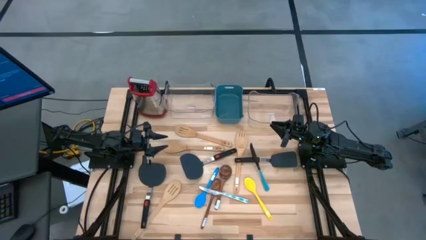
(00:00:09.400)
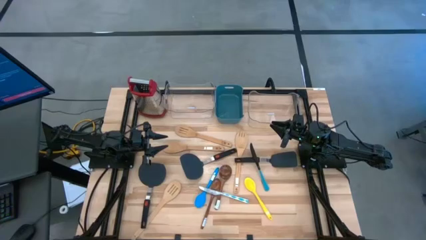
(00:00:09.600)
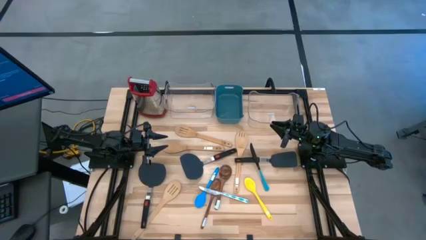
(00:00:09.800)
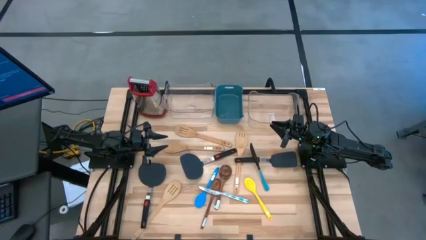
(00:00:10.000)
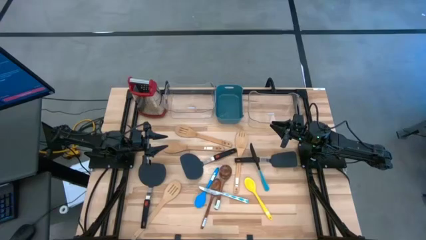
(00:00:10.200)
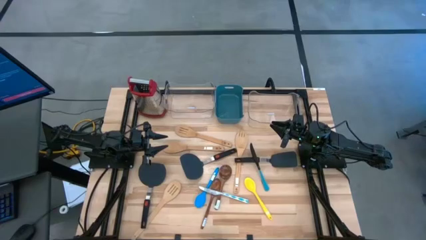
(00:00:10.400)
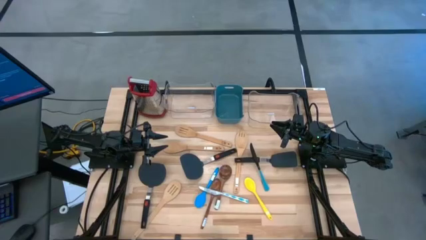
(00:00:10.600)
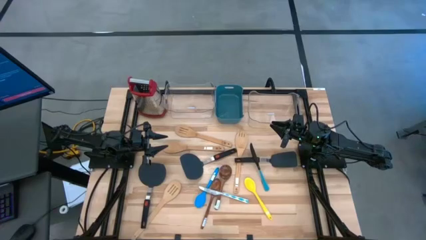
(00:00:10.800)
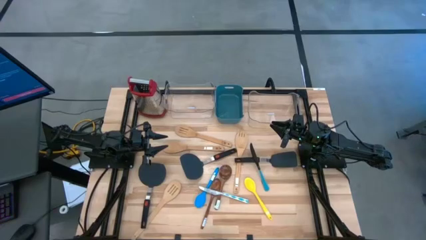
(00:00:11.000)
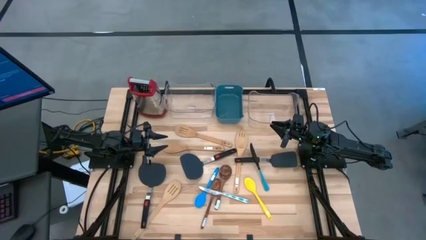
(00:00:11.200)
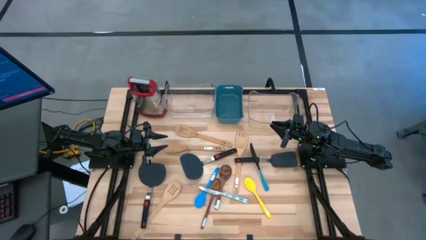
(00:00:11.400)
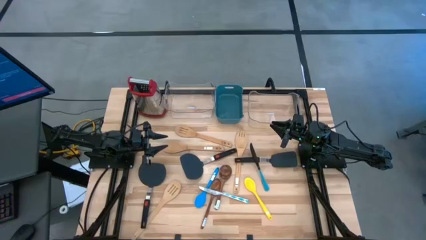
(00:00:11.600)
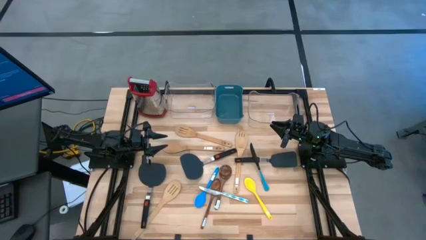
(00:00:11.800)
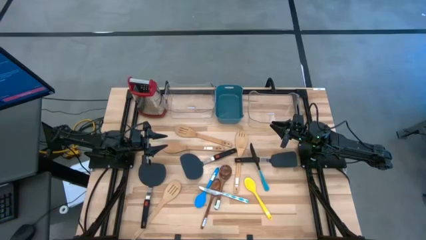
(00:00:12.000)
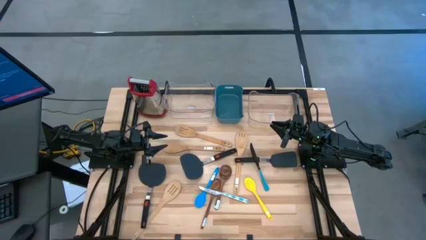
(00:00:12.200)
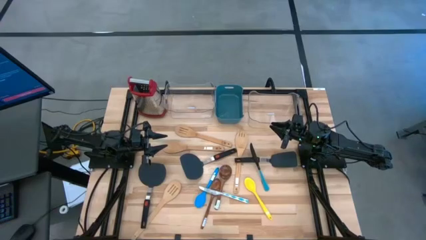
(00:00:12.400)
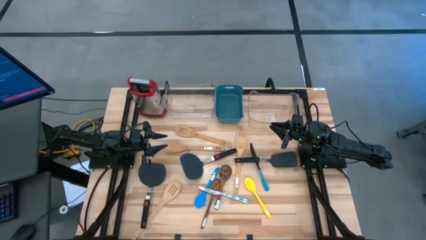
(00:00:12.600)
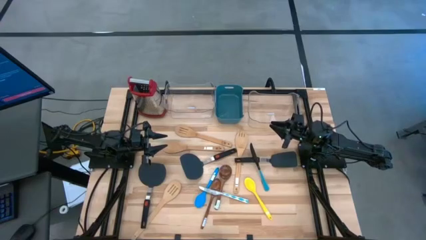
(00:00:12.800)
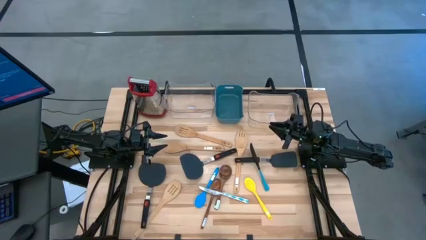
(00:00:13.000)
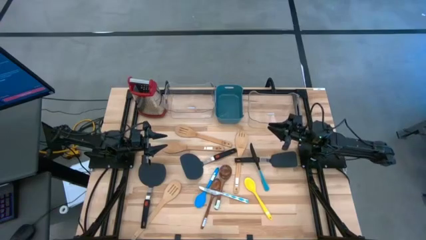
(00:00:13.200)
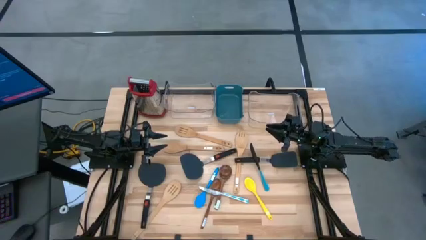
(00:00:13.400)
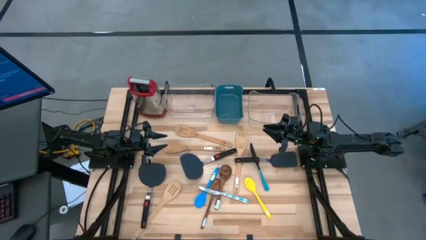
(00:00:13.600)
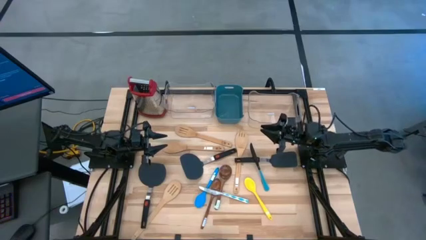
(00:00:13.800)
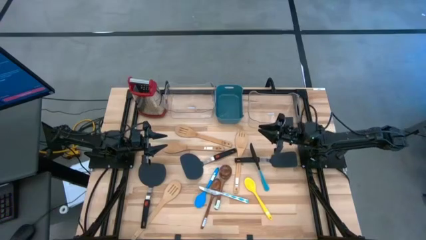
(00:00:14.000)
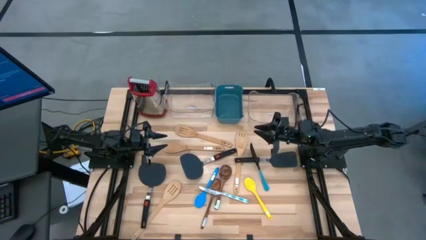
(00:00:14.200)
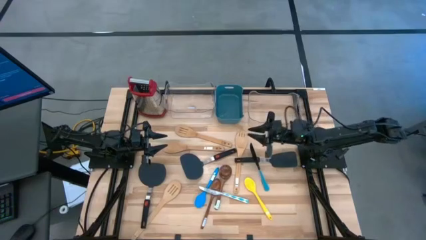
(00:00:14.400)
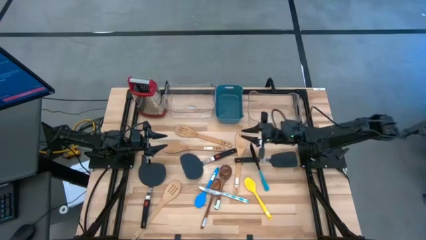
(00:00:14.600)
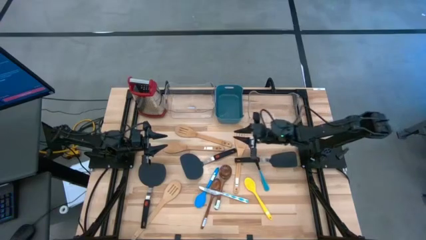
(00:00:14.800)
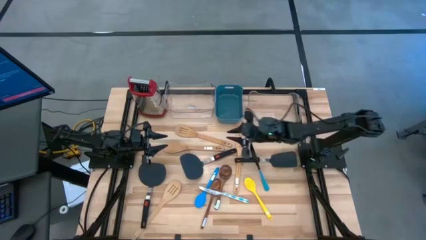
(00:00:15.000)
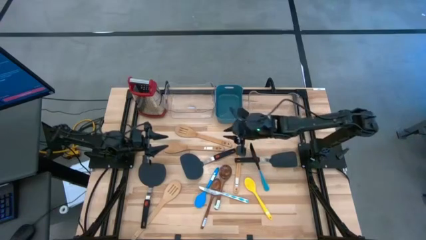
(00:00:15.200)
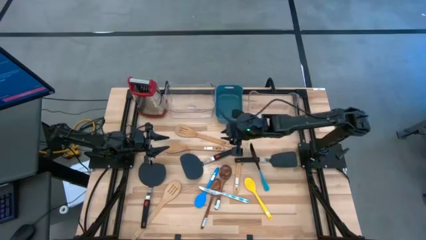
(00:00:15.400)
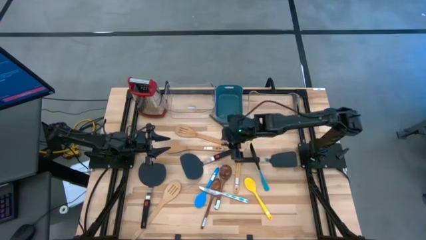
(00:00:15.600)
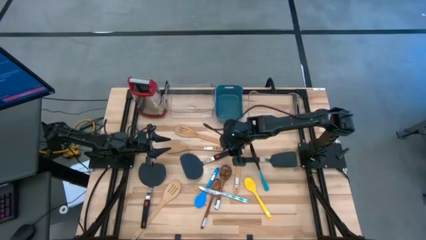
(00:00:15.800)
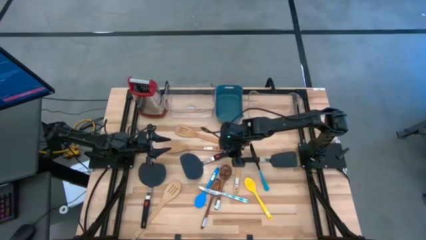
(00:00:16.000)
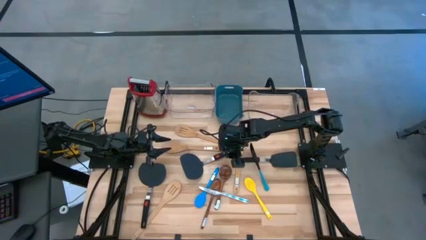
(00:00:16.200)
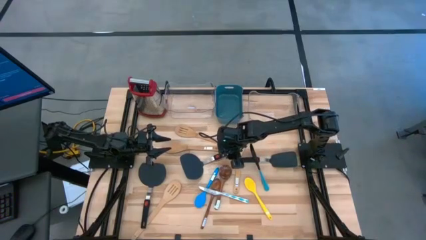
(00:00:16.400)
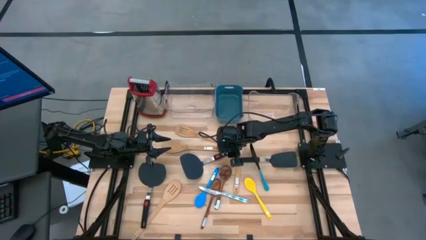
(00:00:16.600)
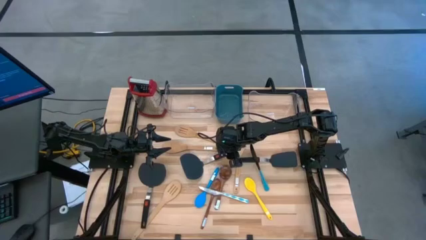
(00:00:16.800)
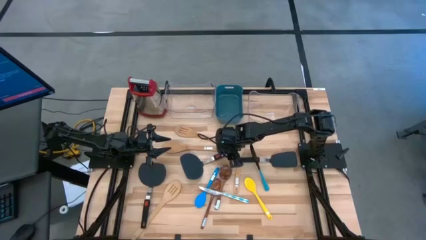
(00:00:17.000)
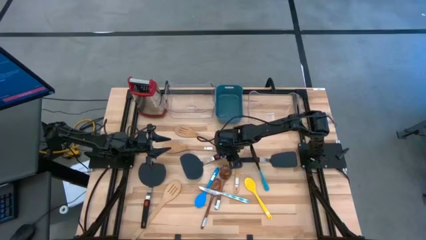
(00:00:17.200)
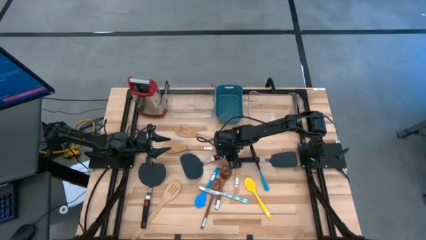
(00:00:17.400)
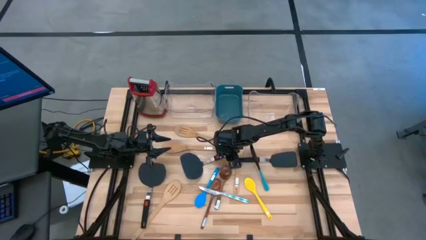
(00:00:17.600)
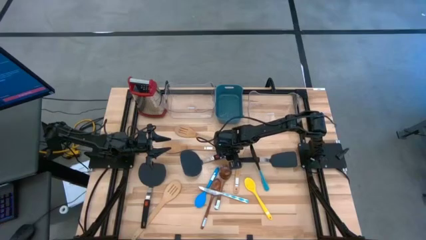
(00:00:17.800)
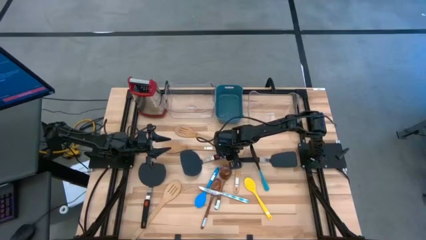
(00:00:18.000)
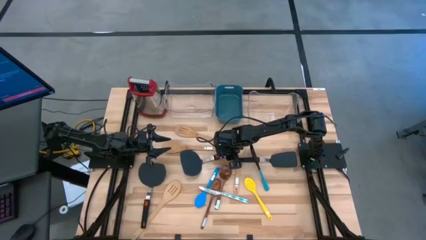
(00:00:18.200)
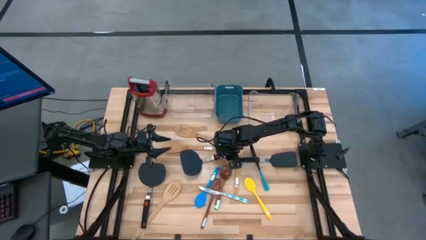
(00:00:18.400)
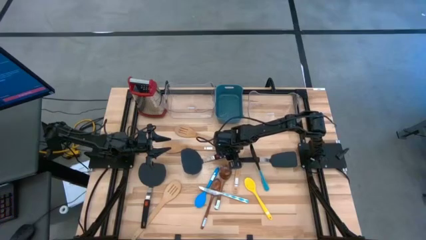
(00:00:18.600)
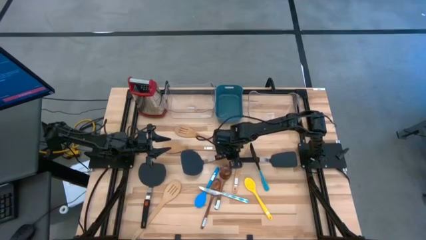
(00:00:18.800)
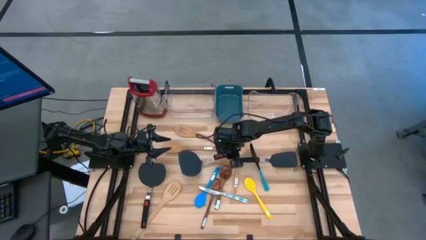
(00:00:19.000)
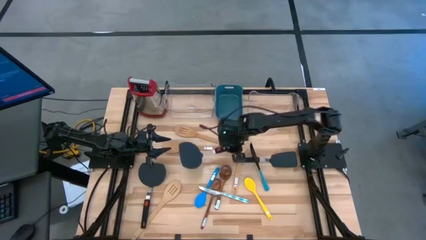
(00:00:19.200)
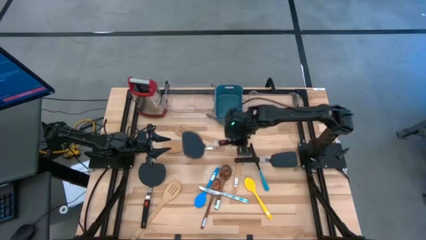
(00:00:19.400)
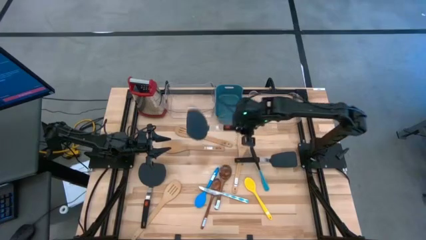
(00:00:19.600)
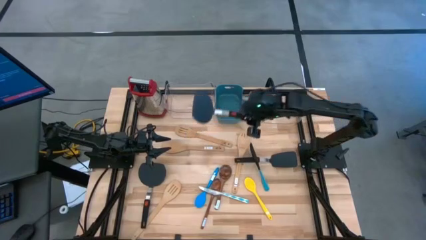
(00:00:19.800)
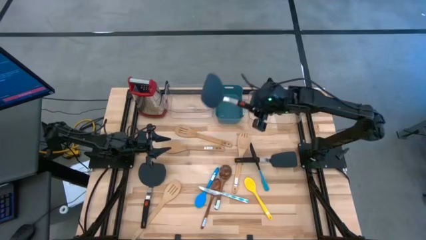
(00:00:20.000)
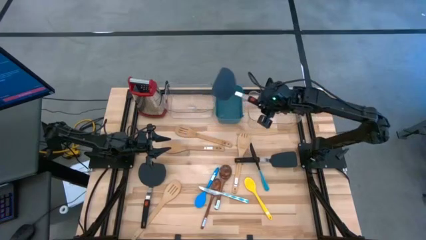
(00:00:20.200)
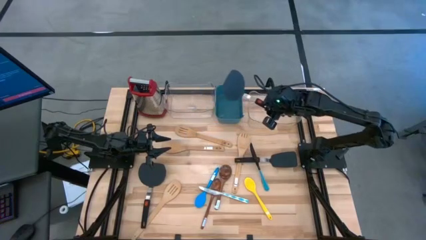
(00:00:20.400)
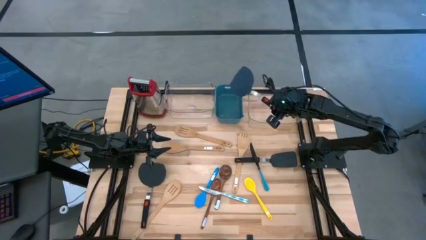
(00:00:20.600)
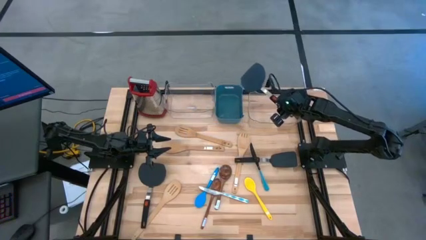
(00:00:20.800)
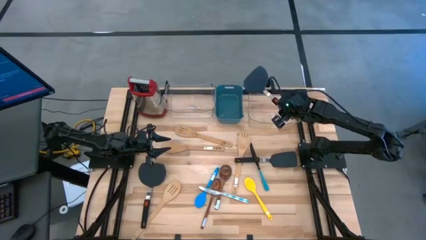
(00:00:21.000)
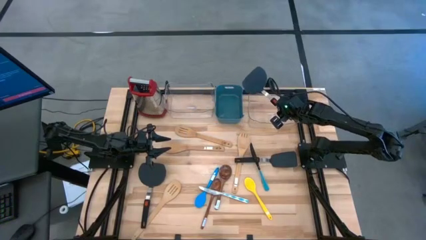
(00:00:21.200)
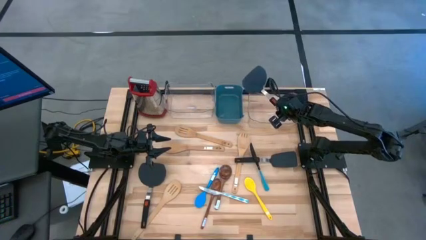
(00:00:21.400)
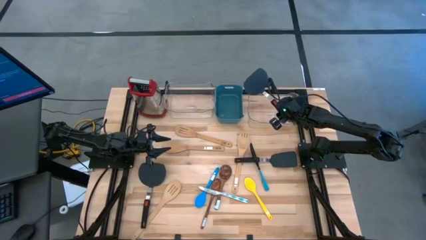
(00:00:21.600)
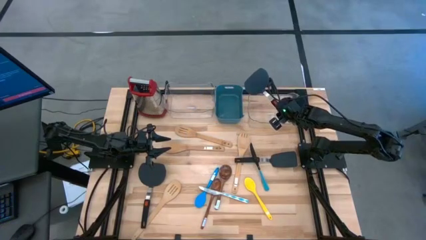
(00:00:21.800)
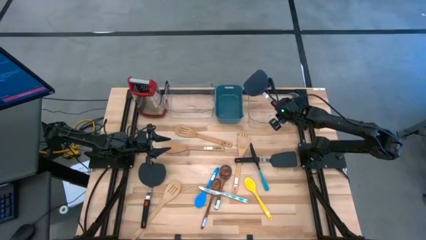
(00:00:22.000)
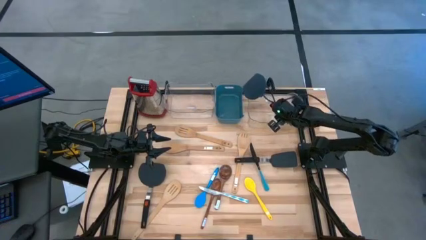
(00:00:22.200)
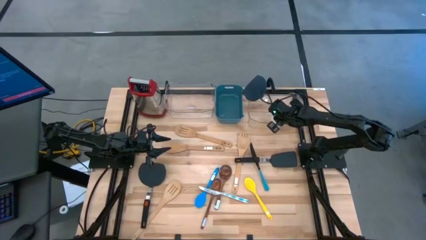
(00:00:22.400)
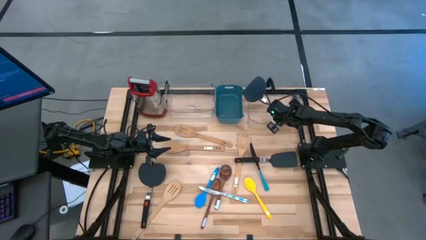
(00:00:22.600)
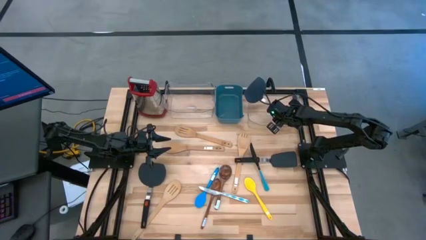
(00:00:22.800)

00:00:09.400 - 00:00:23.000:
Task: Pick & Place Kitchen Items
Put the black spatula into the right transparent bin
